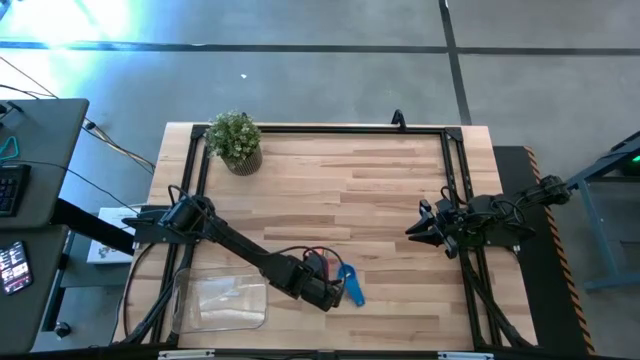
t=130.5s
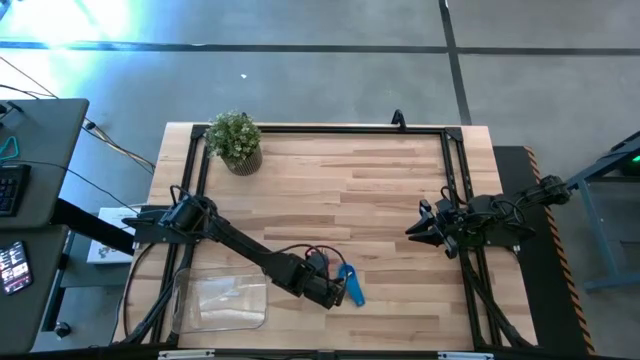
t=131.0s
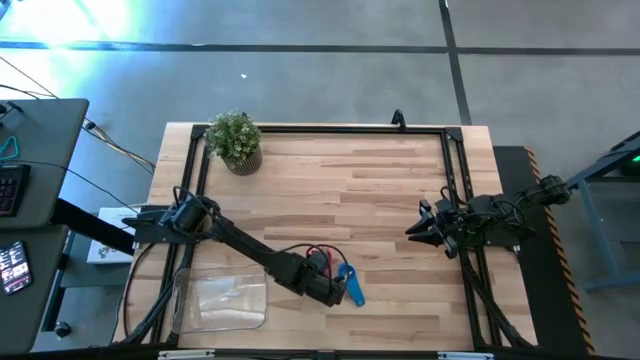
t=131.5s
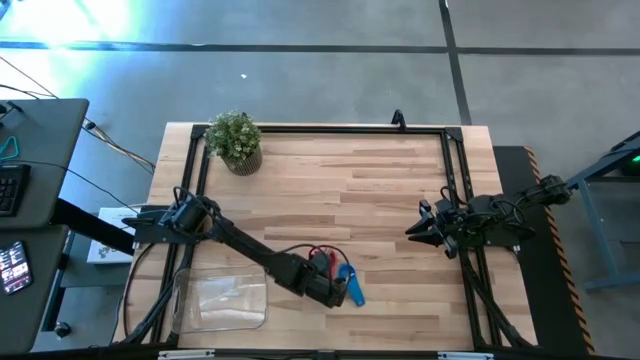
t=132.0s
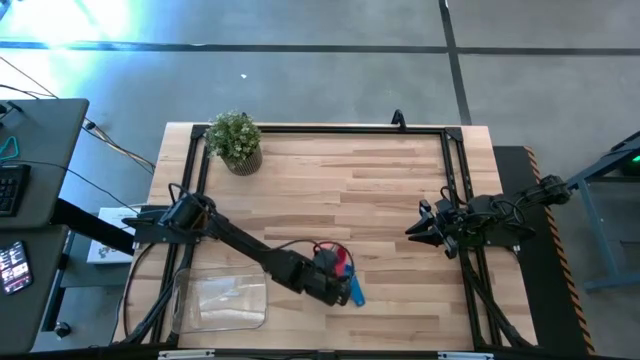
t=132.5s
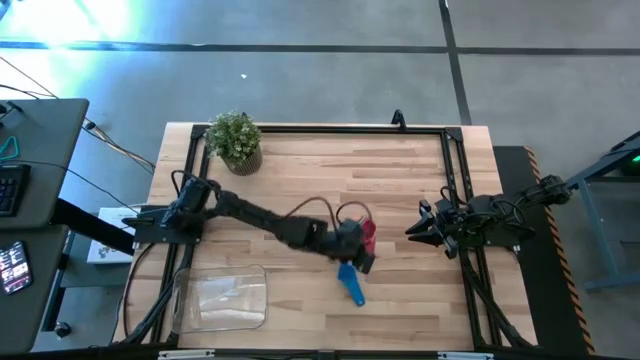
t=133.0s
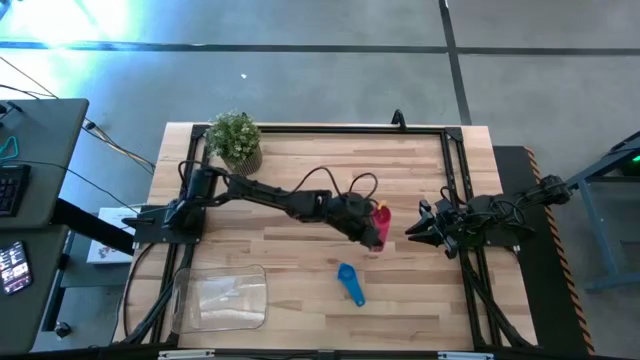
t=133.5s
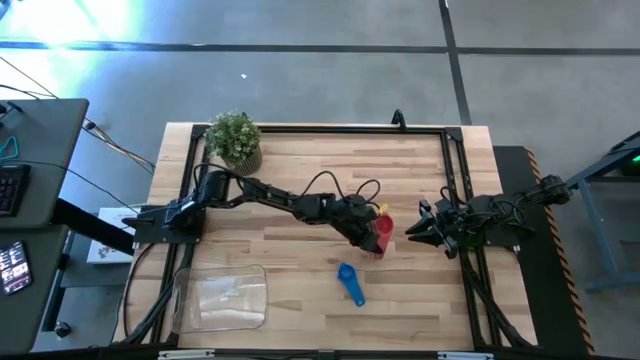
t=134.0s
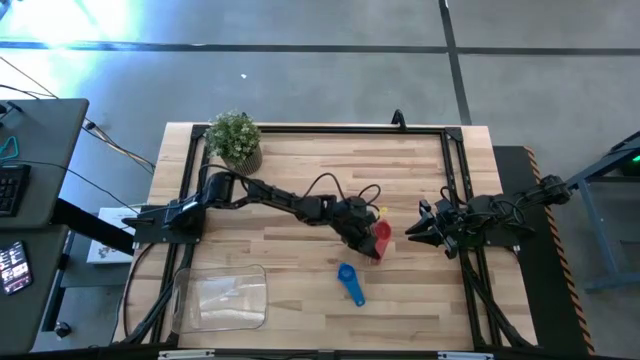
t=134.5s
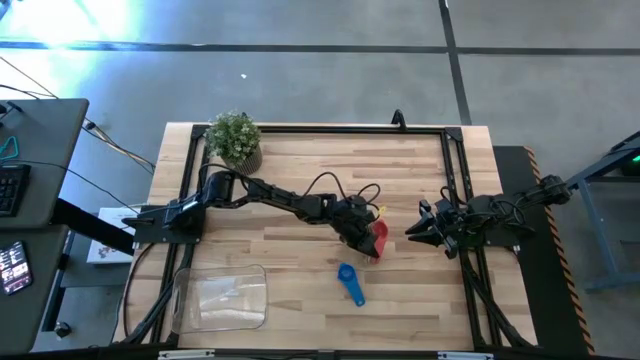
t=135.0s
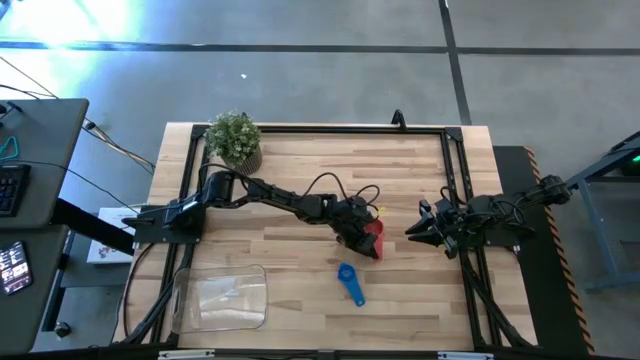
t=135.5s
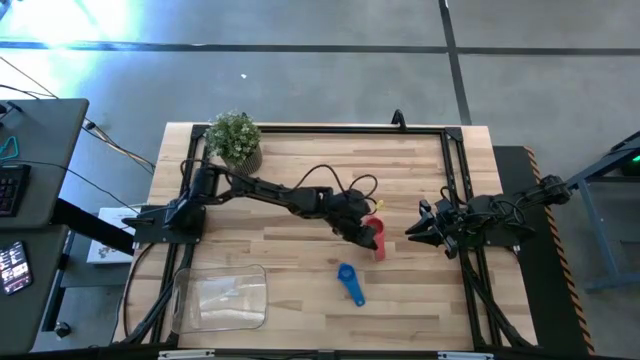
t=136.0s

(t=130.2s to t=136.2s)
Task: Nest measuring cups in basket
Move the nested measuring cup to the center of the table

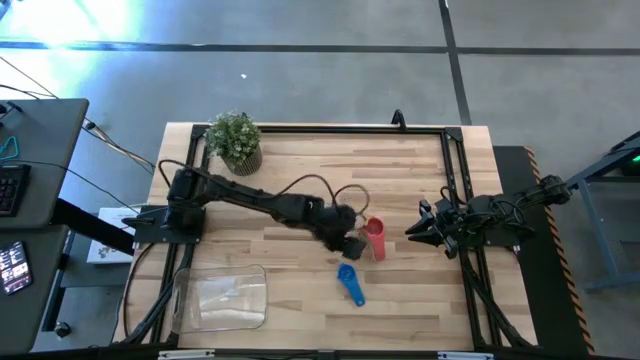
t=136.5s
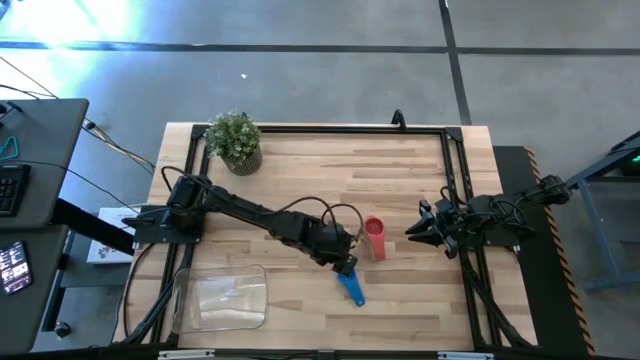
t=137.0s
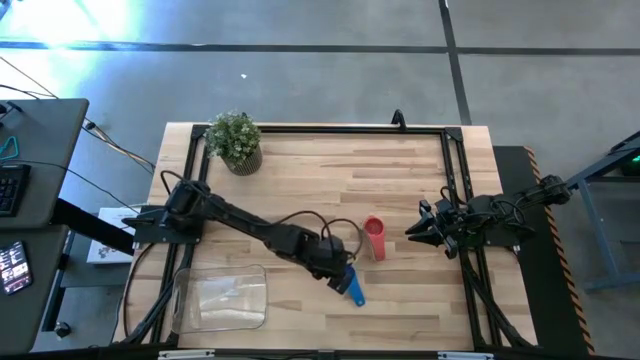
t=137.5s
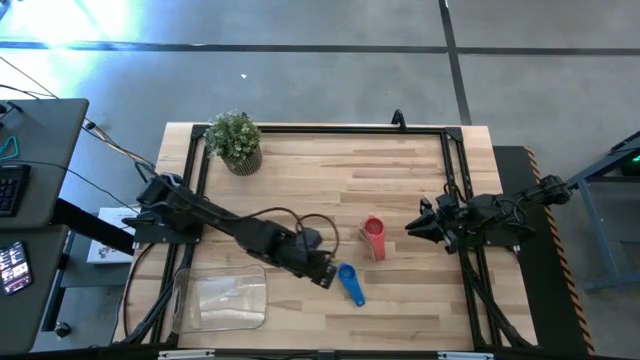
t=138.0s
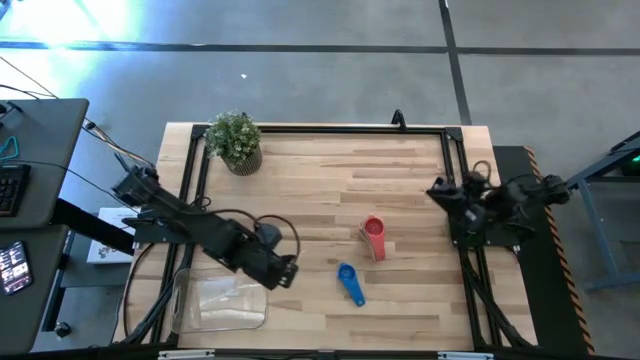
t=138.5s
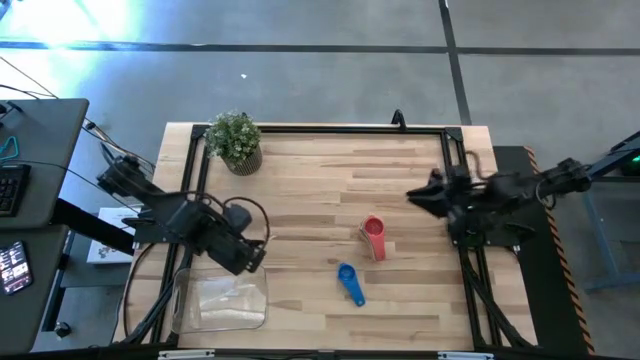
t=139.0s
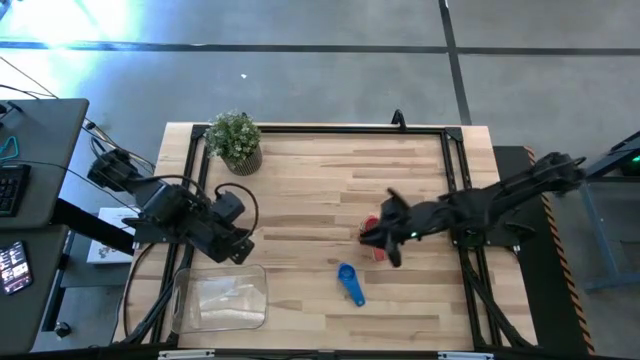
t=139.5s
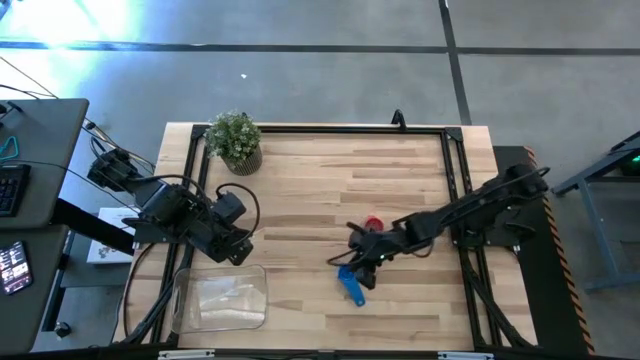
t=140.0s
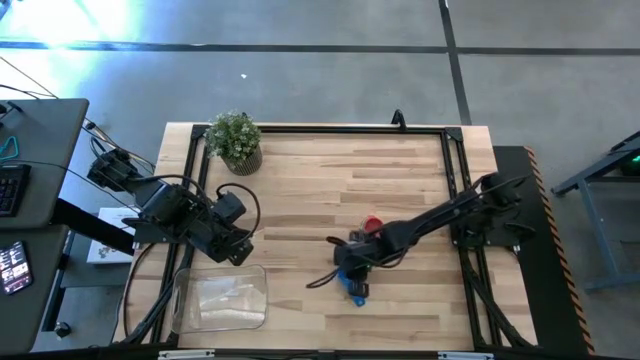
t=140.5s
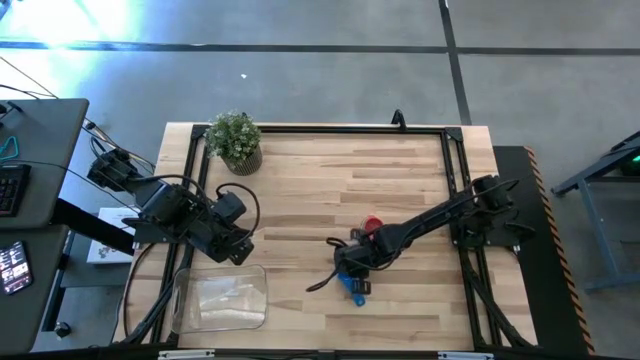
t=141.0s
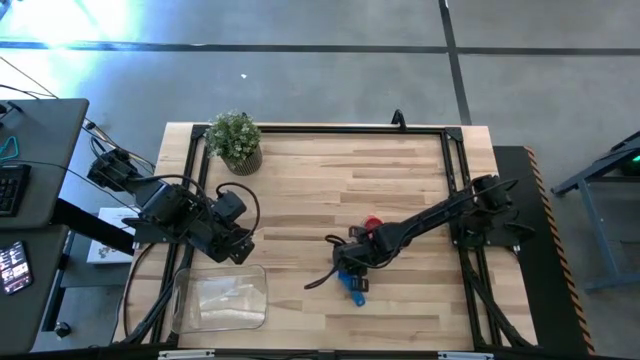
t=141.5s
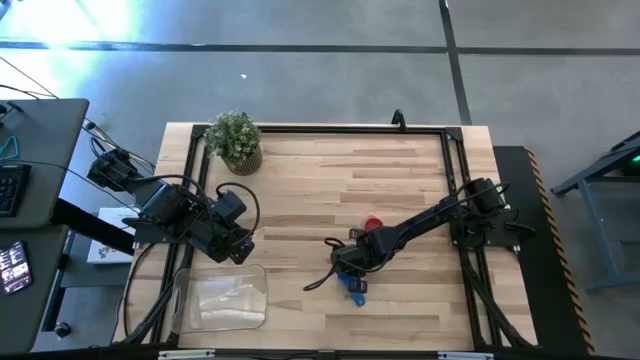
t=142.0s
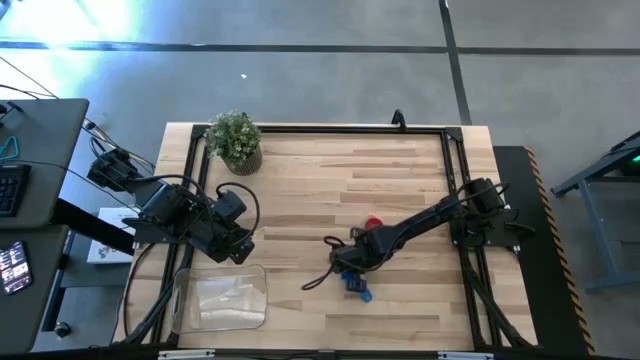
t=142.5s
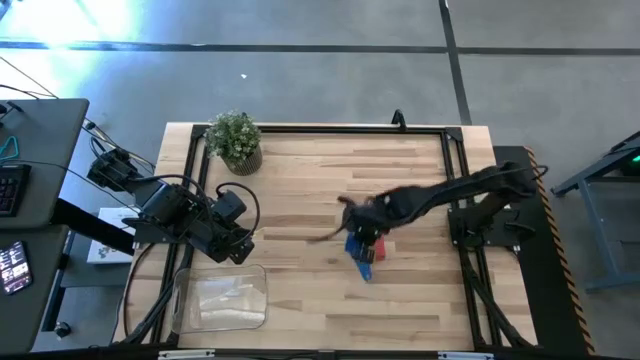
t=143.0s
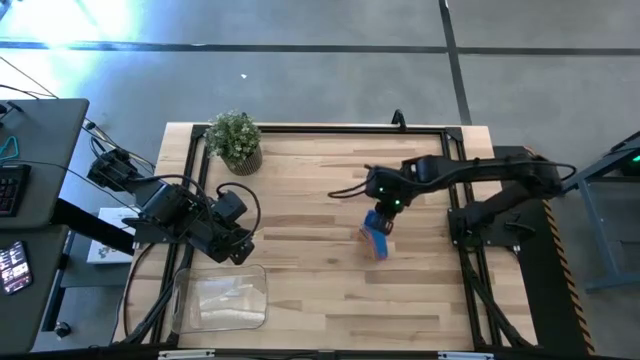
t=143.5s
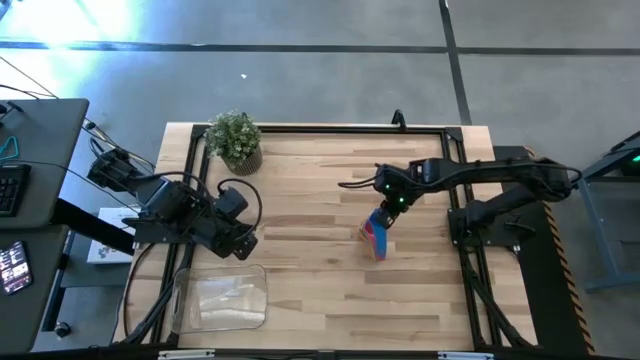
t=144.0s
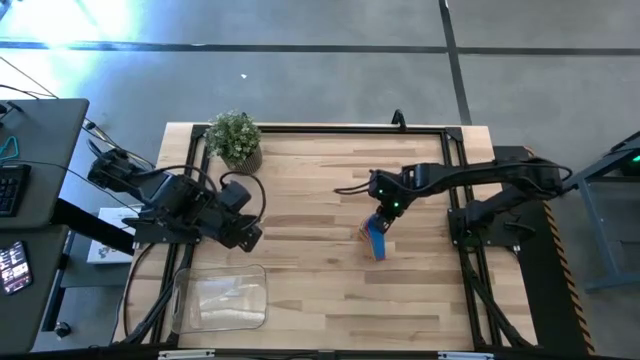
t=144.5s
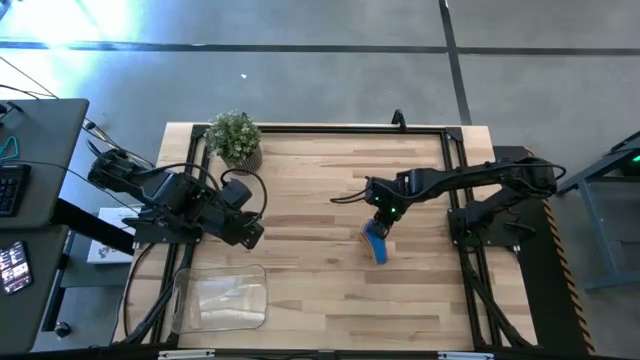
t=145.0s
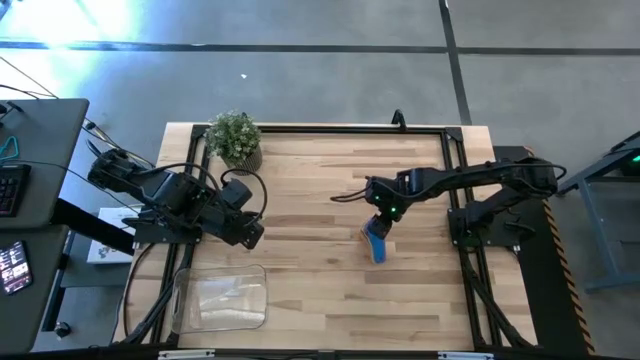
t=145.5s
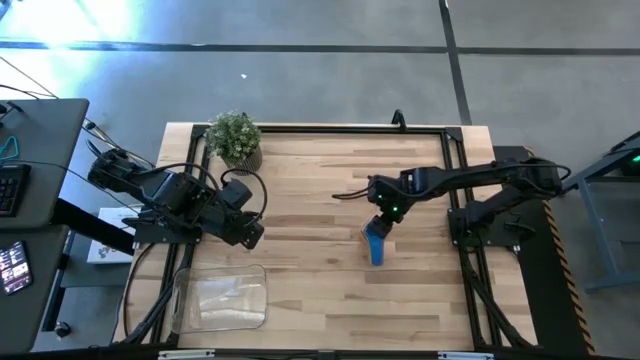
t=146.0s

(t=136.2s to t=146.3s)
Stack the blue measuring cup on top of the red measuring cup

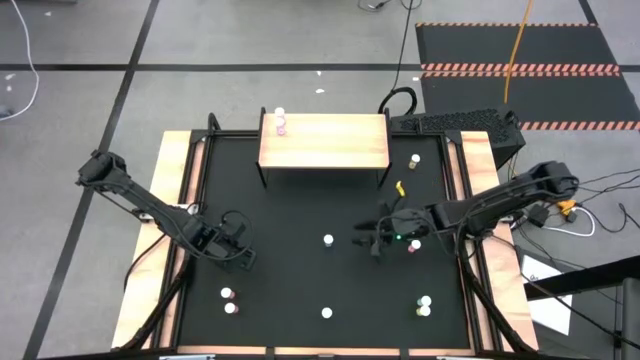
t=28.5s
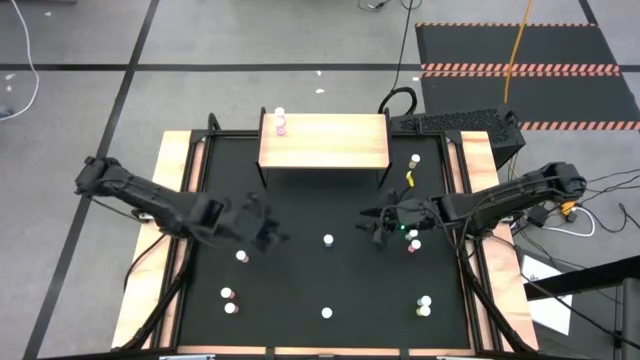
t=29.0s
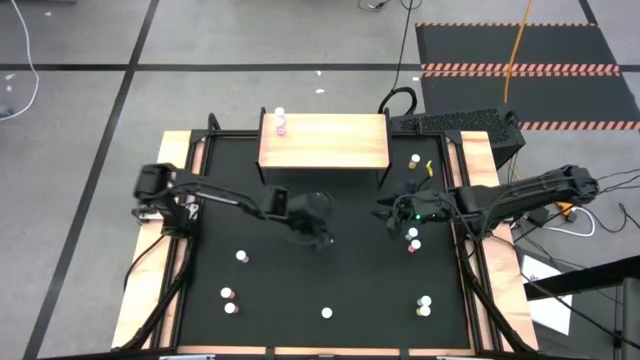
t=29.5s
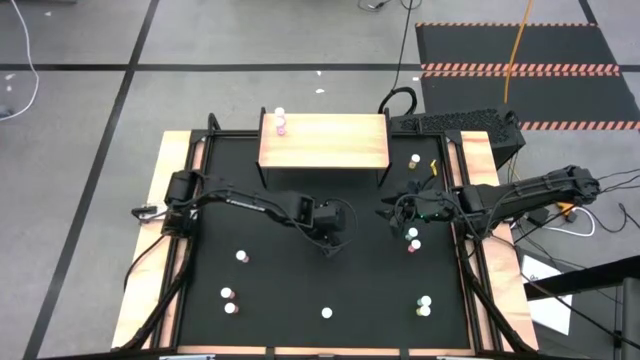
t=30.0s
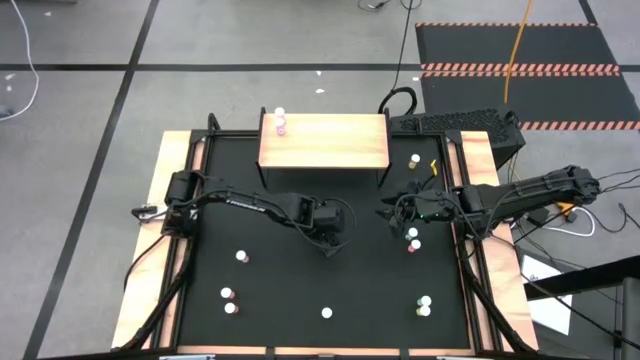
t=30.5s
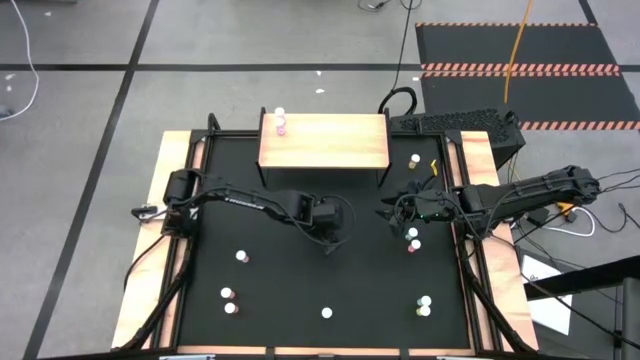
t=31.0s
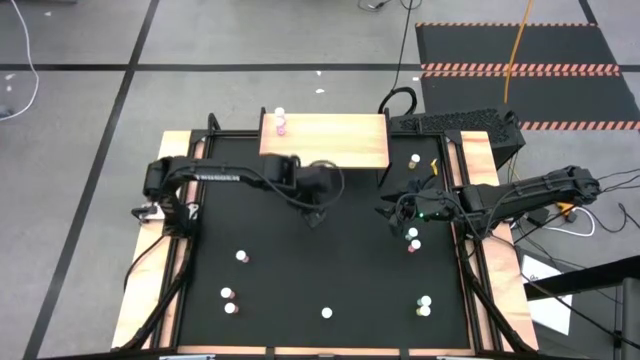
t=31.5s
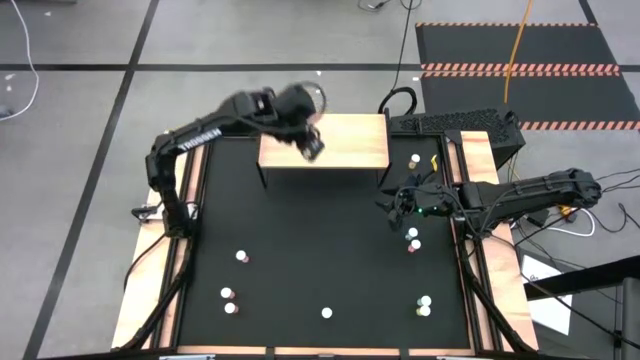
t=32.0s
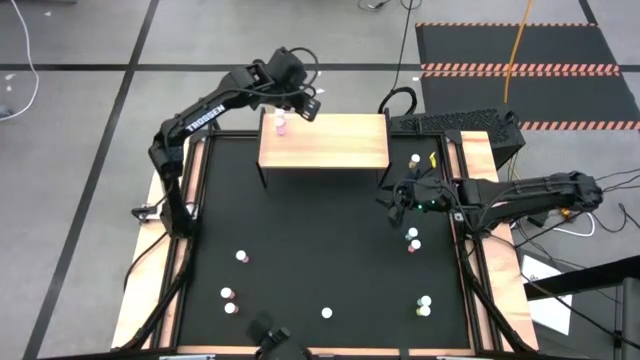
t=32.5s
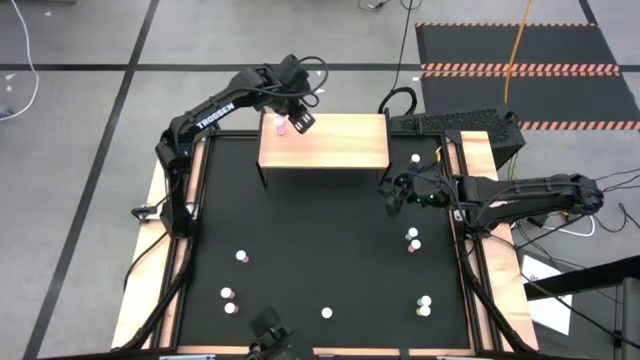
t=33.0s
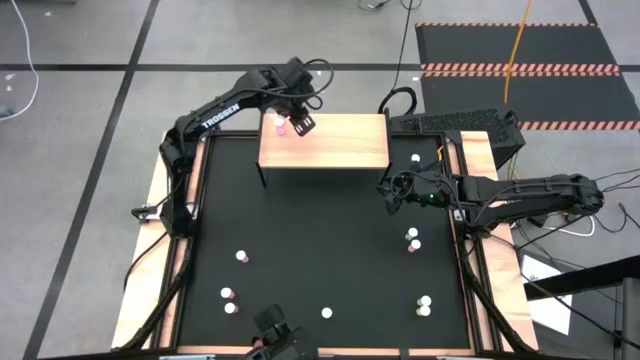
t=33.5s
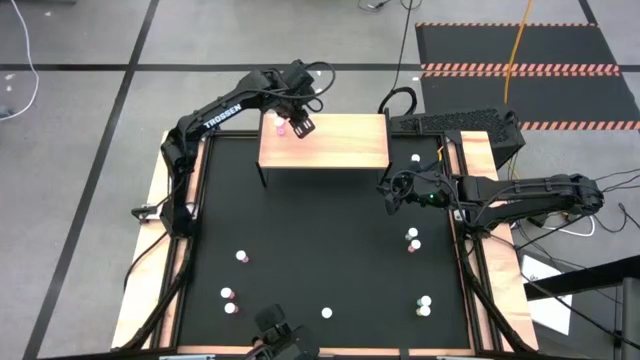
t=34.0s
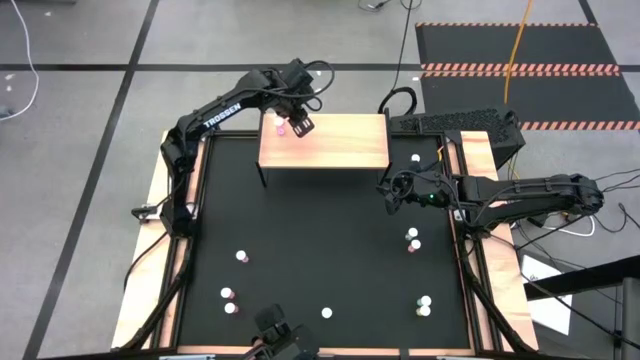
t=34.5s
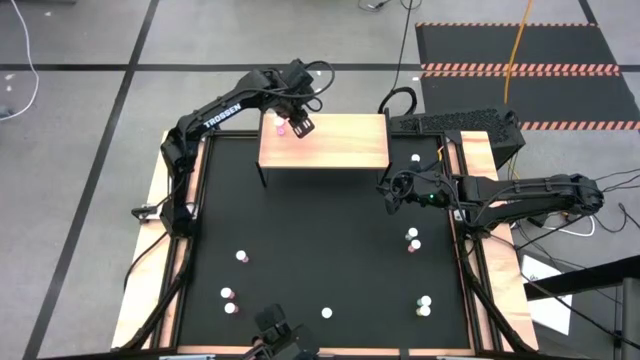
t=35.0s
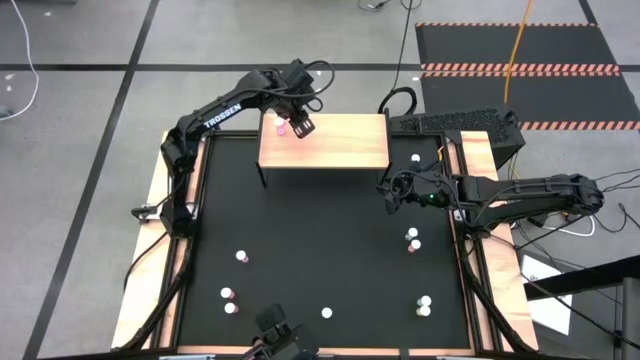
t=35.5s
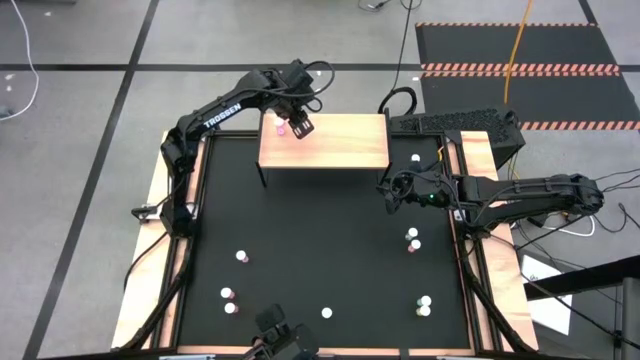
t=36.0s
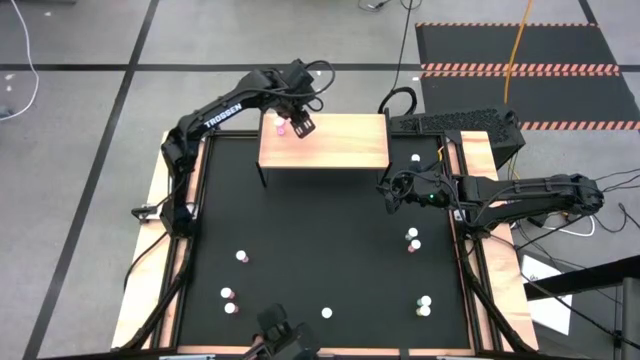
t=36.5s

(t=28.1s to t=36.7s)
Task: Pick and place medicine bottles onto shelf by color
Put the top left blue pill bottle on the shelf
